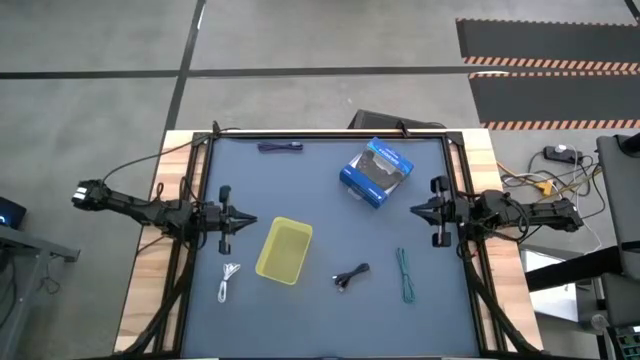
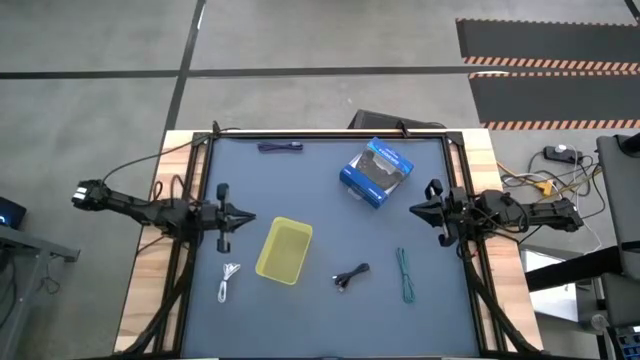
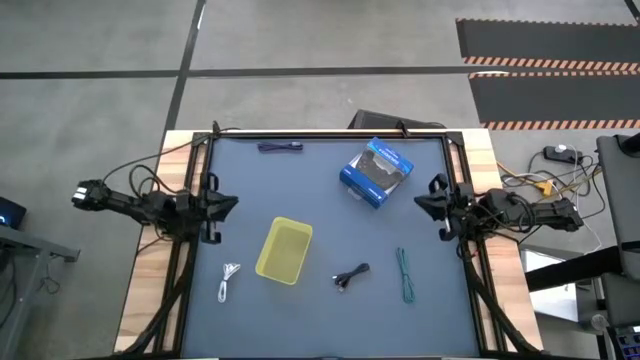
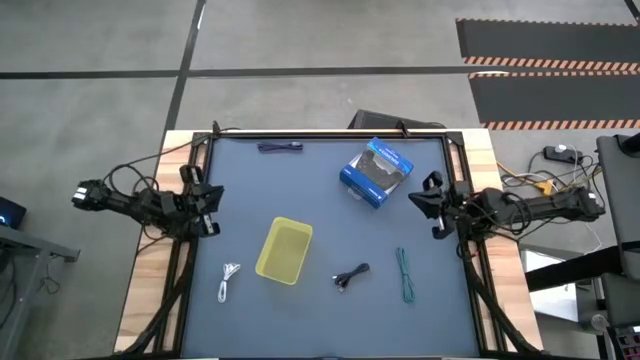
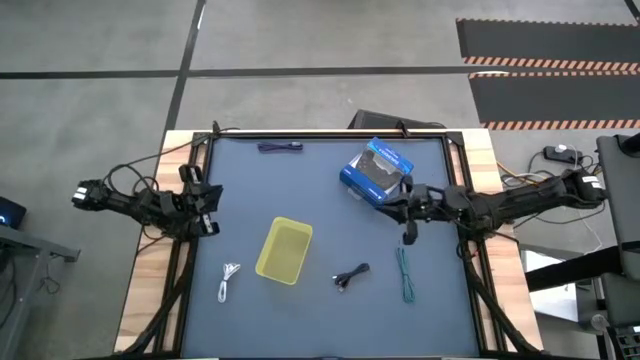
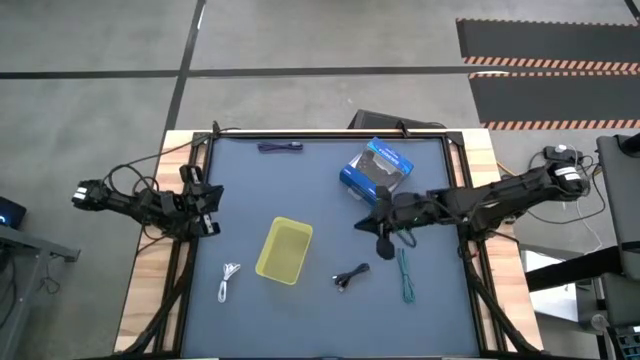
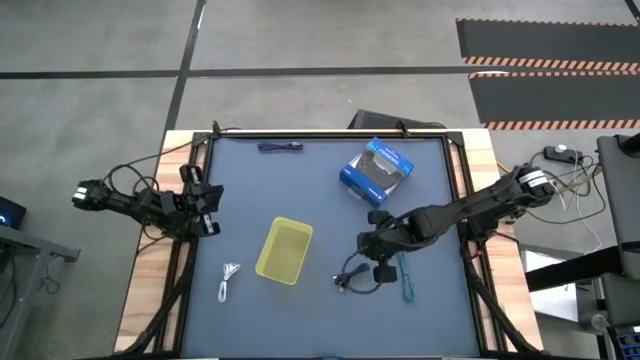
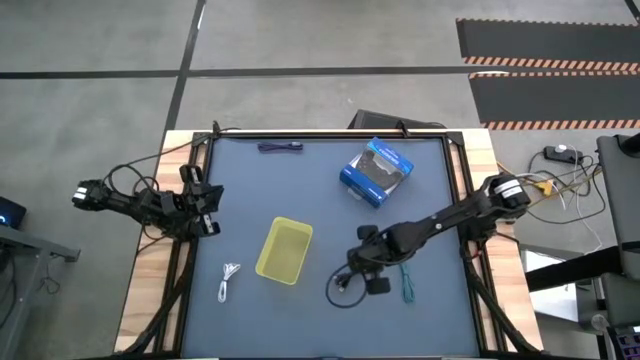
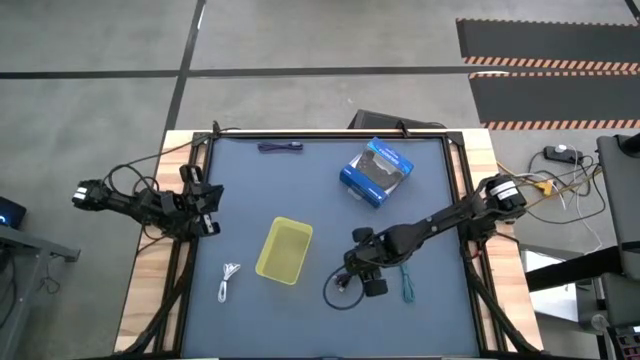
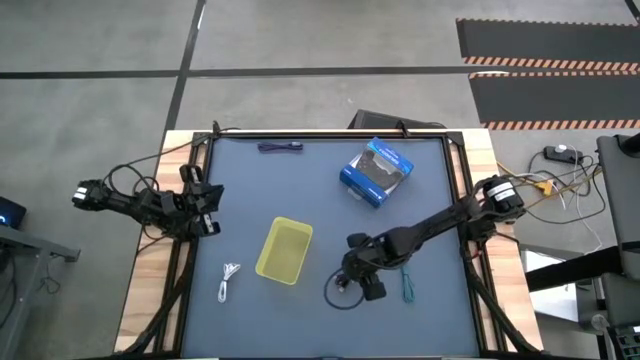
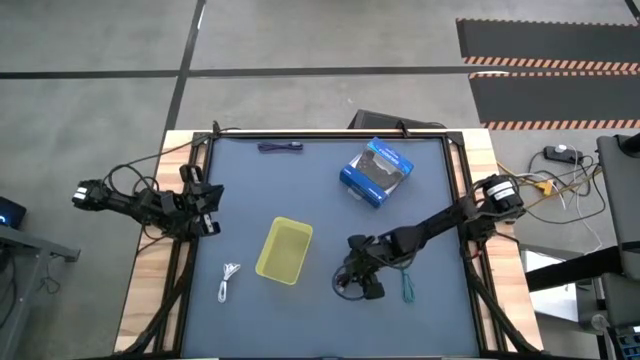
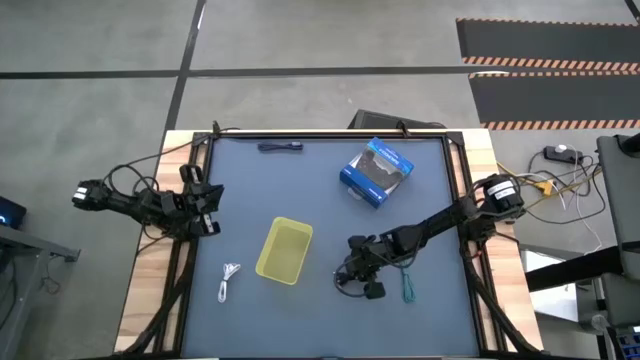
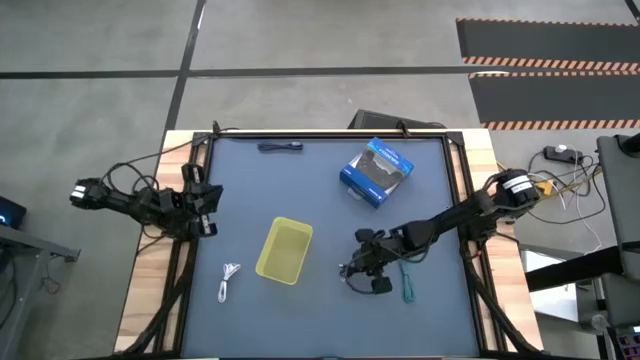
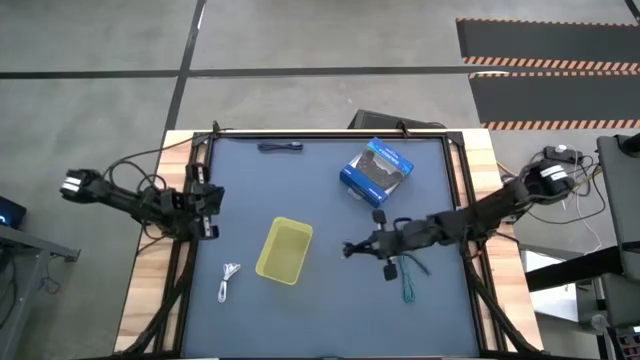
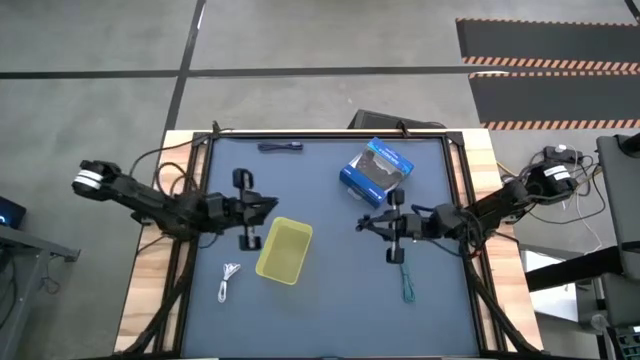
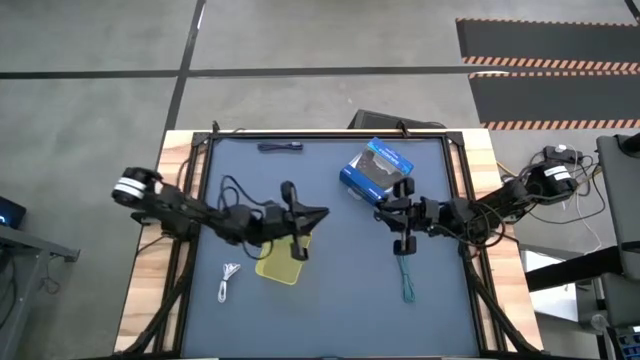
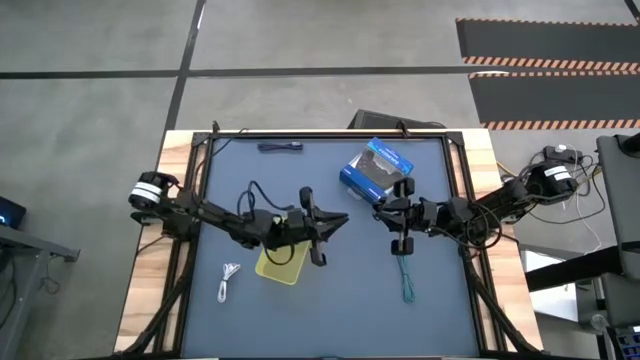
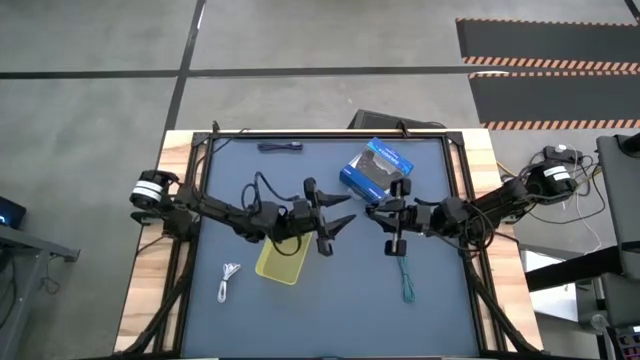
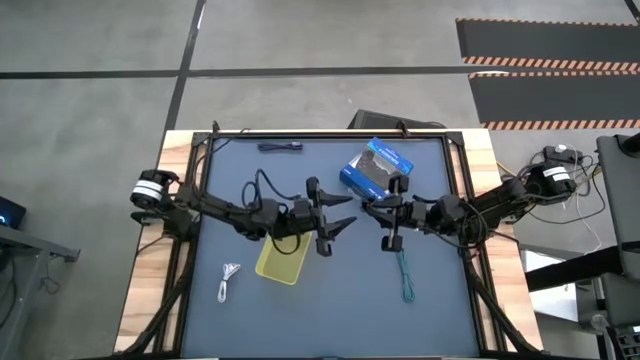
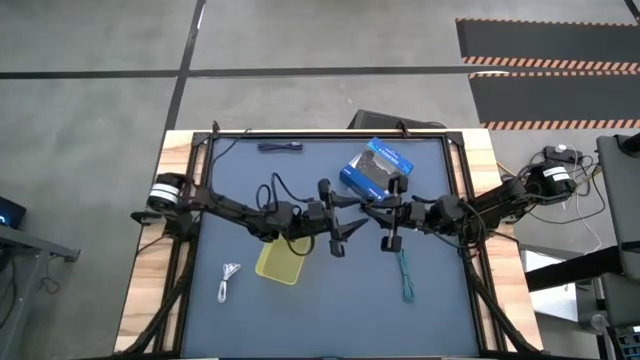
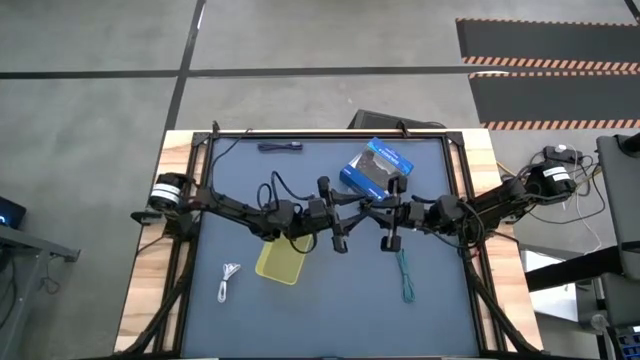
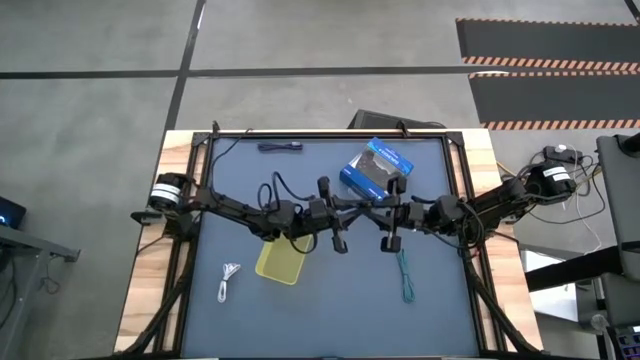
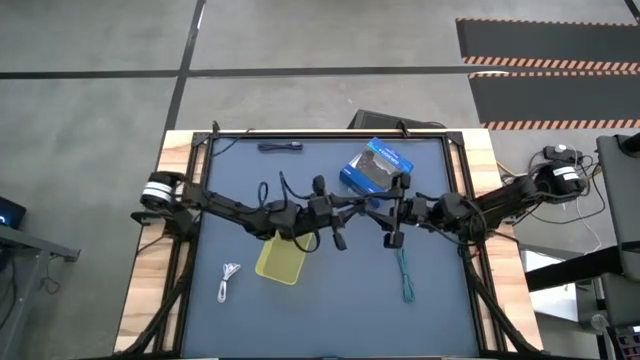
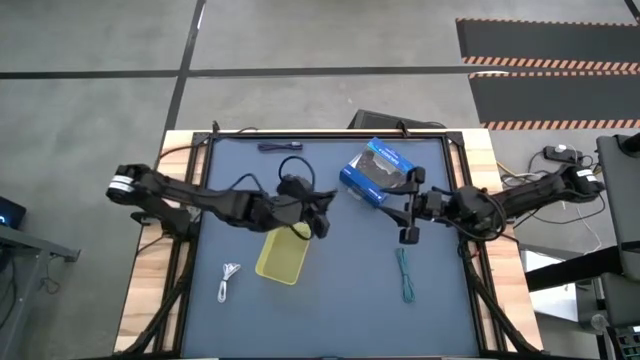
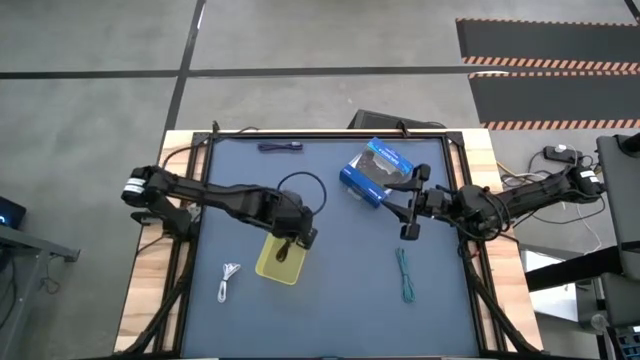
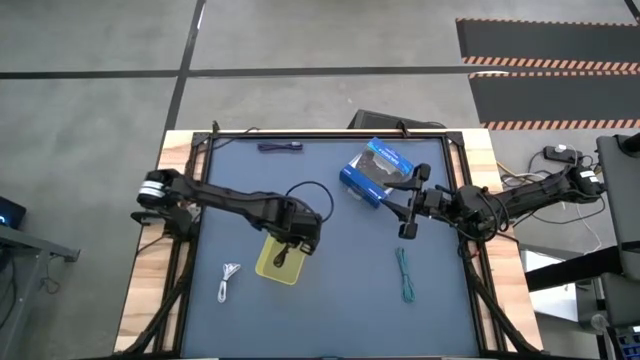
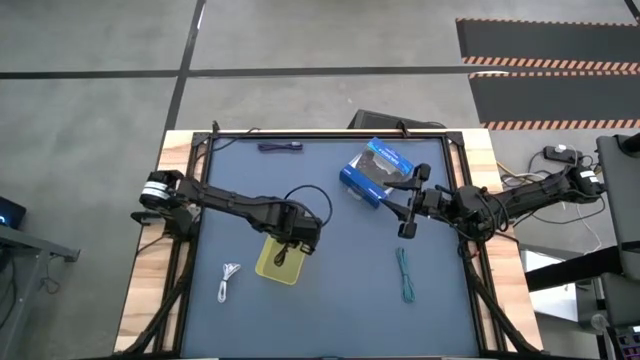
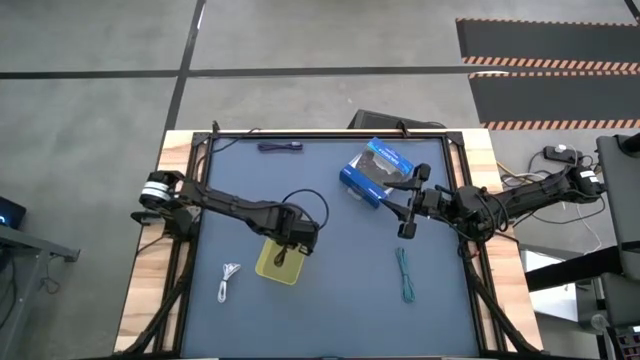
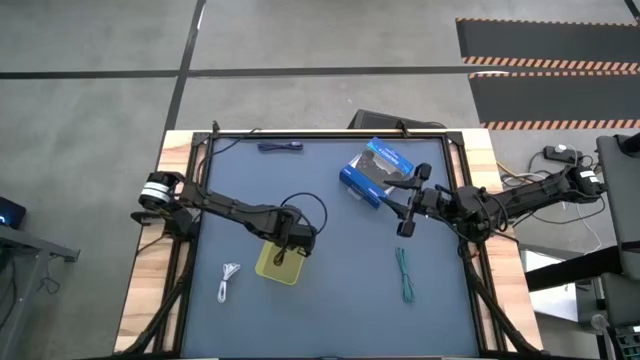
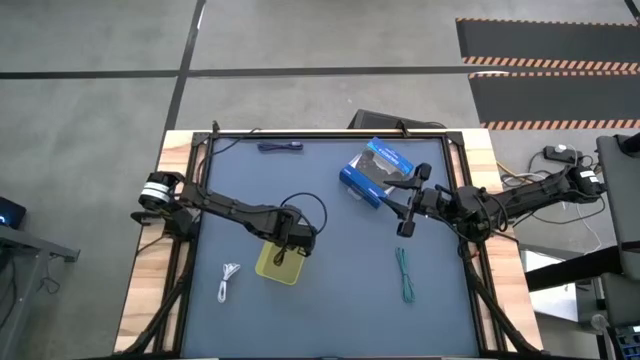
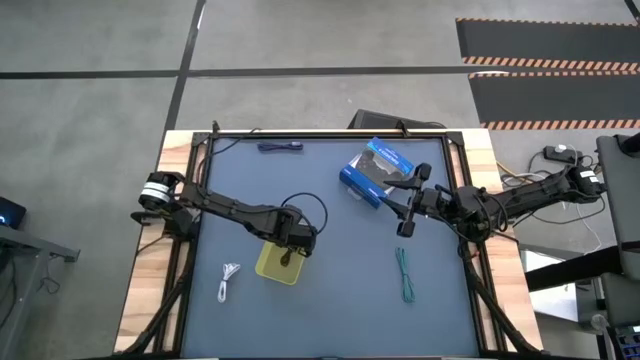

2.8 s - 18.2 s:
Task: Pick and place USB-C Cables
Put the black charger cable into the yellow bin
